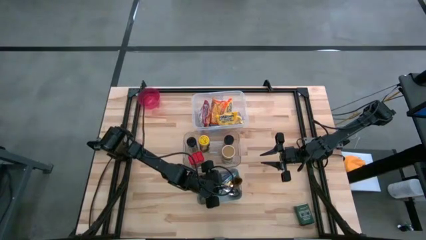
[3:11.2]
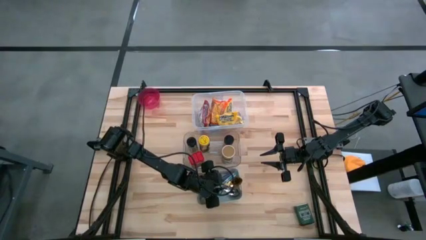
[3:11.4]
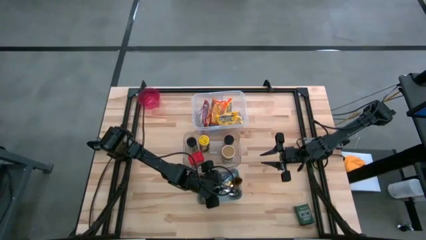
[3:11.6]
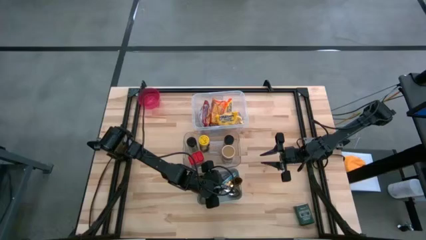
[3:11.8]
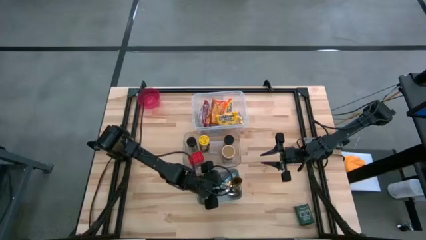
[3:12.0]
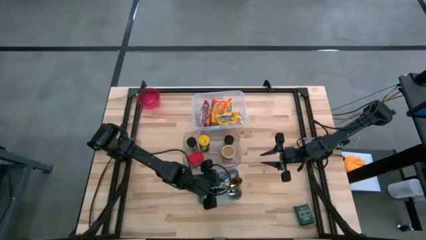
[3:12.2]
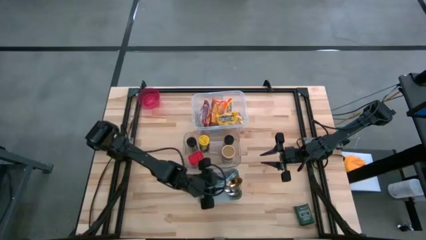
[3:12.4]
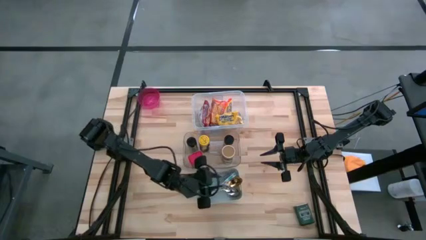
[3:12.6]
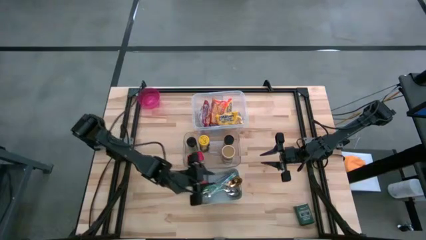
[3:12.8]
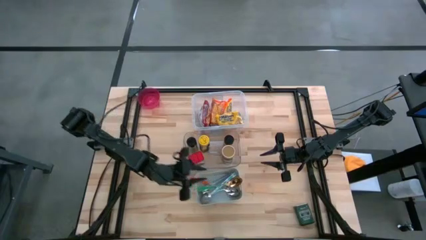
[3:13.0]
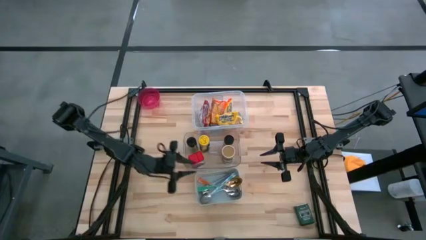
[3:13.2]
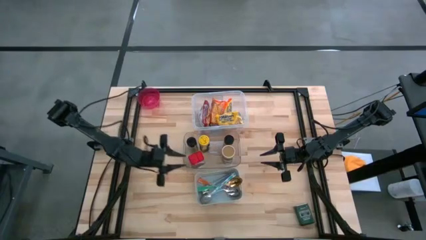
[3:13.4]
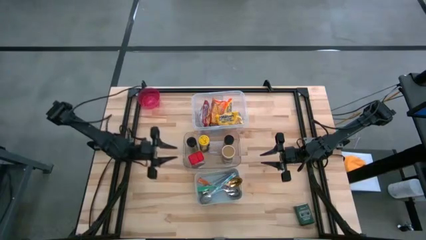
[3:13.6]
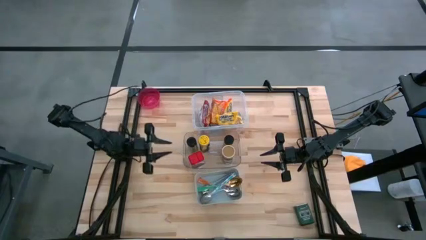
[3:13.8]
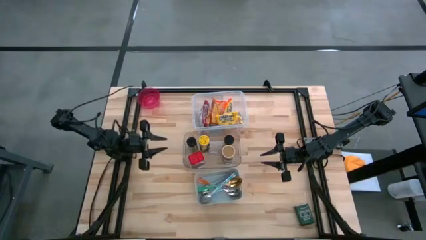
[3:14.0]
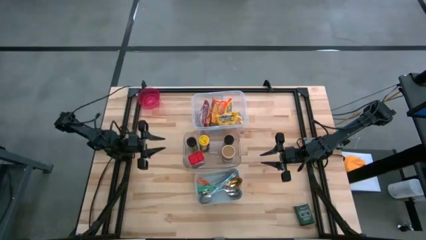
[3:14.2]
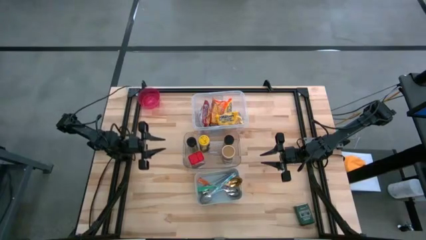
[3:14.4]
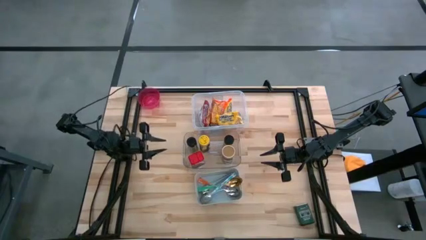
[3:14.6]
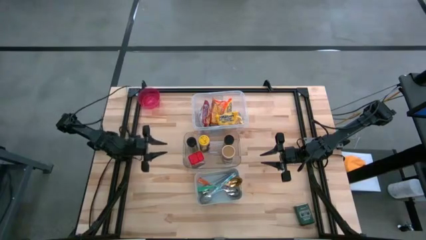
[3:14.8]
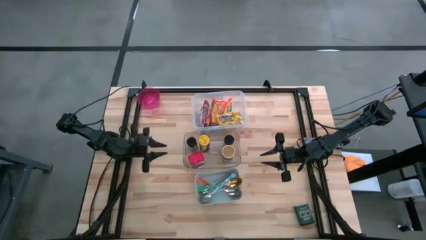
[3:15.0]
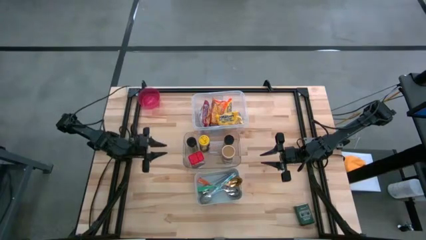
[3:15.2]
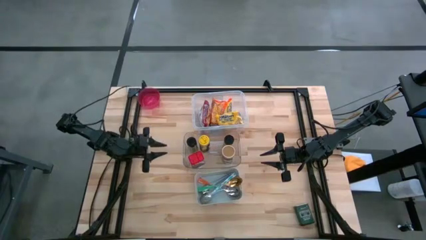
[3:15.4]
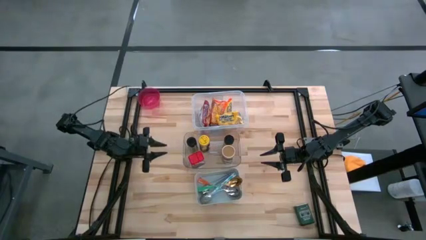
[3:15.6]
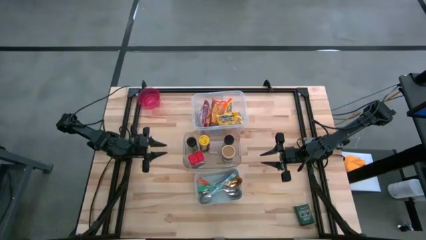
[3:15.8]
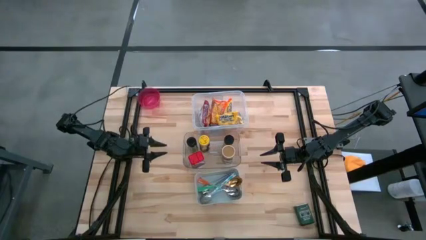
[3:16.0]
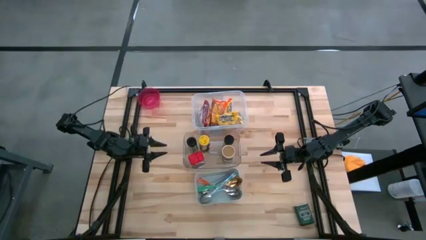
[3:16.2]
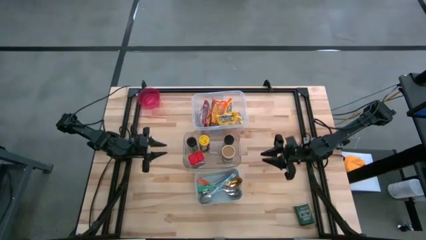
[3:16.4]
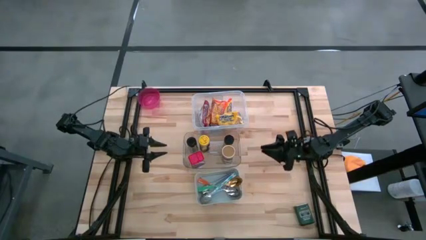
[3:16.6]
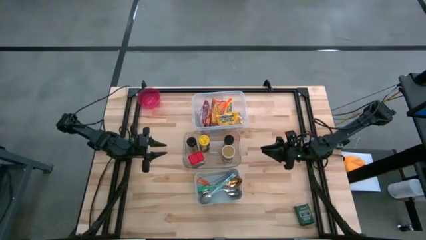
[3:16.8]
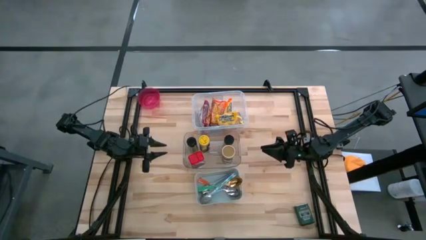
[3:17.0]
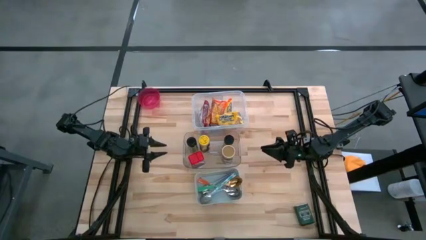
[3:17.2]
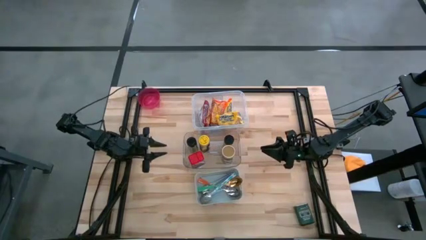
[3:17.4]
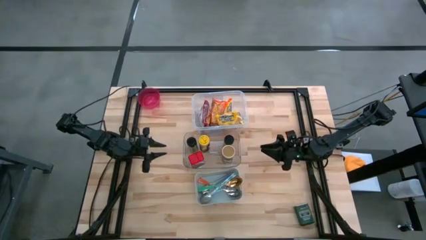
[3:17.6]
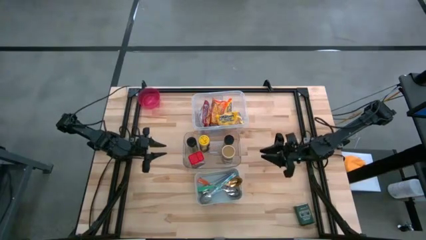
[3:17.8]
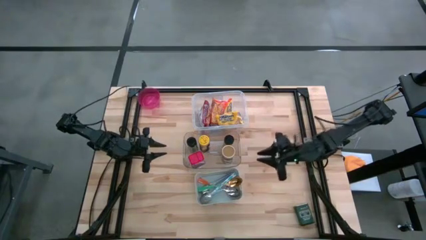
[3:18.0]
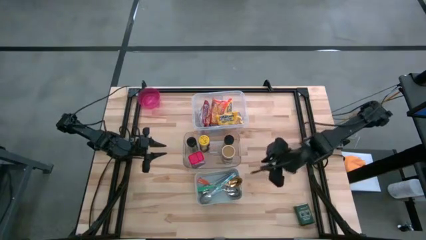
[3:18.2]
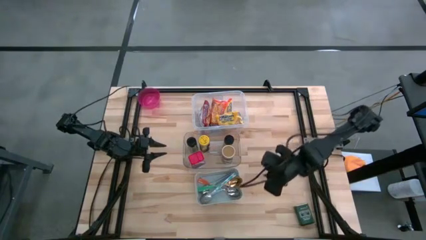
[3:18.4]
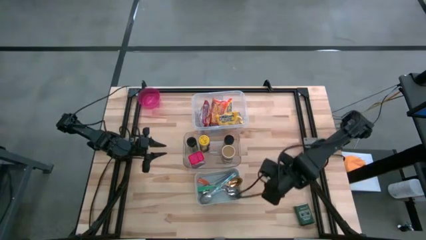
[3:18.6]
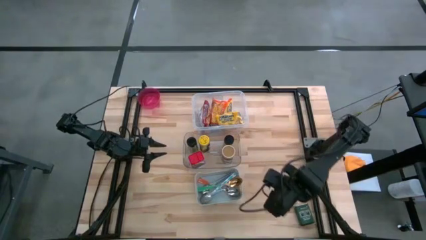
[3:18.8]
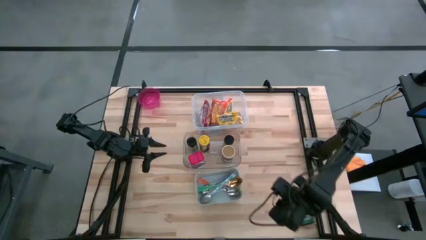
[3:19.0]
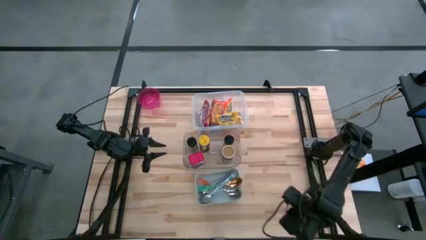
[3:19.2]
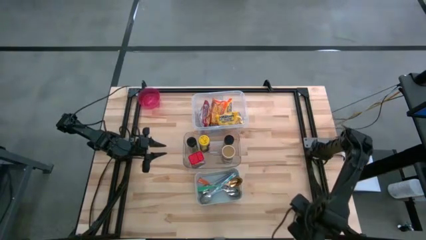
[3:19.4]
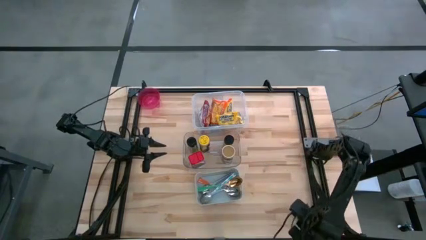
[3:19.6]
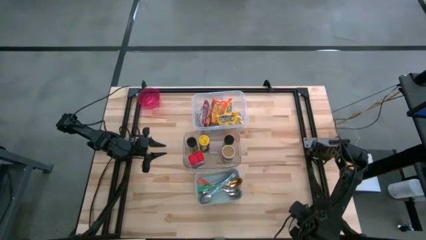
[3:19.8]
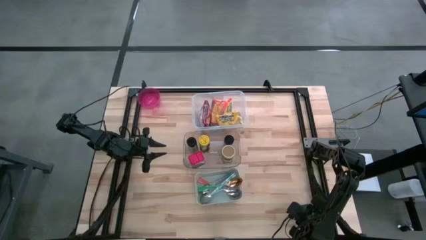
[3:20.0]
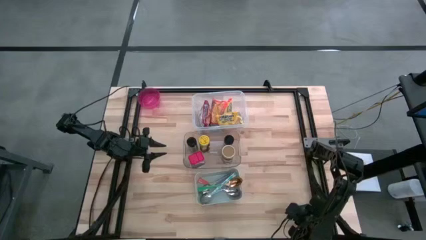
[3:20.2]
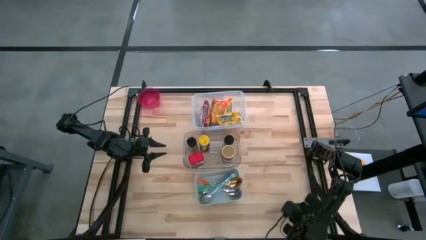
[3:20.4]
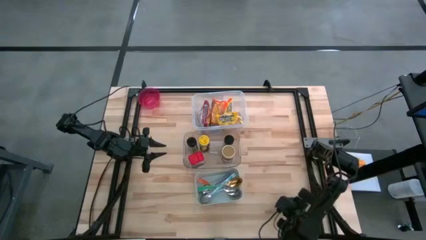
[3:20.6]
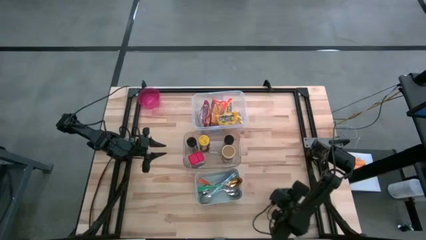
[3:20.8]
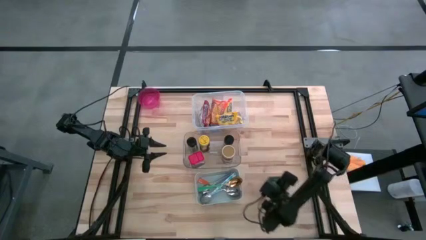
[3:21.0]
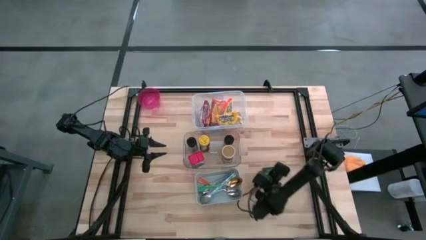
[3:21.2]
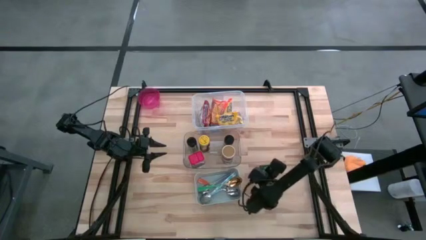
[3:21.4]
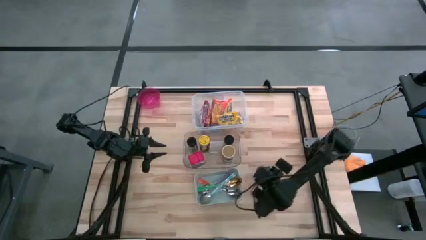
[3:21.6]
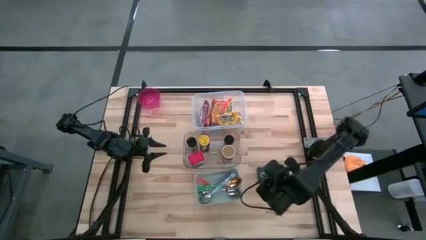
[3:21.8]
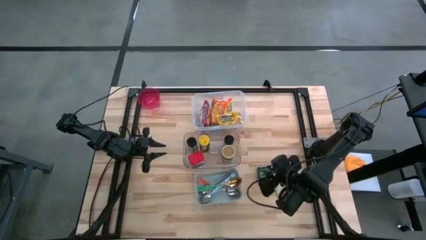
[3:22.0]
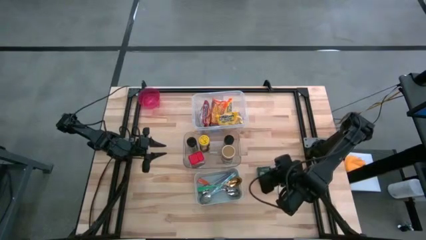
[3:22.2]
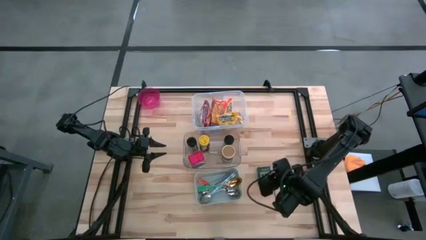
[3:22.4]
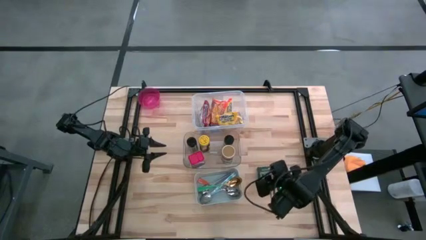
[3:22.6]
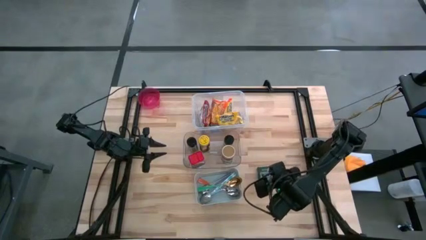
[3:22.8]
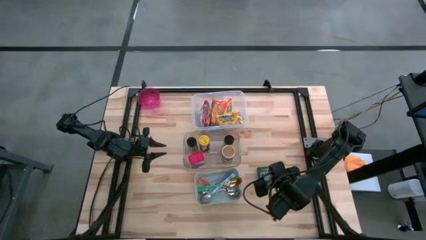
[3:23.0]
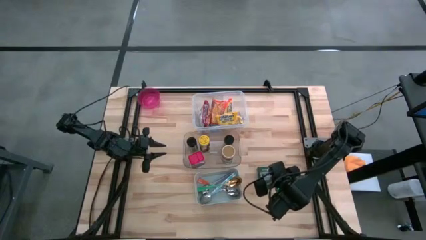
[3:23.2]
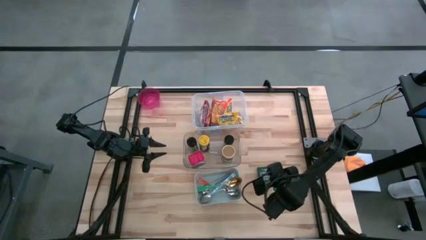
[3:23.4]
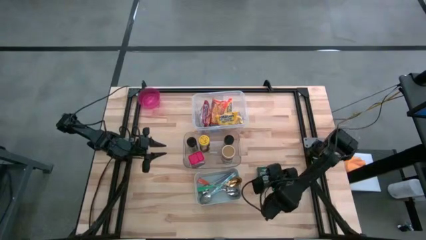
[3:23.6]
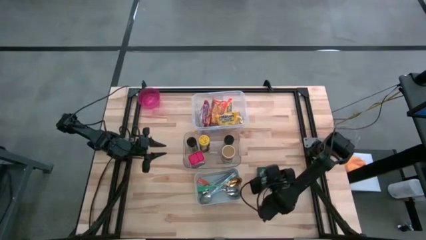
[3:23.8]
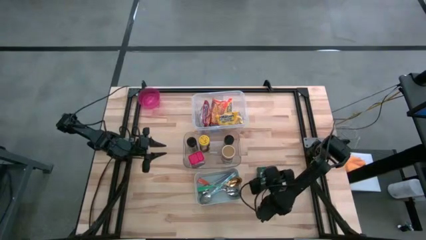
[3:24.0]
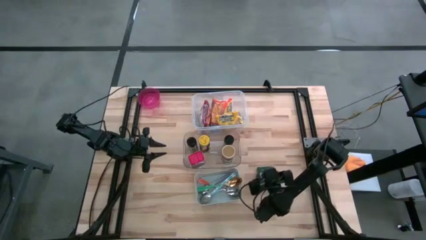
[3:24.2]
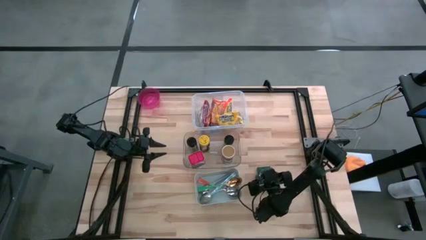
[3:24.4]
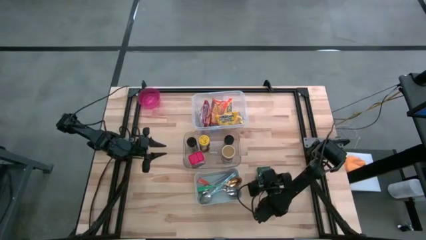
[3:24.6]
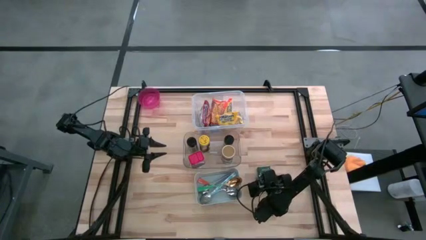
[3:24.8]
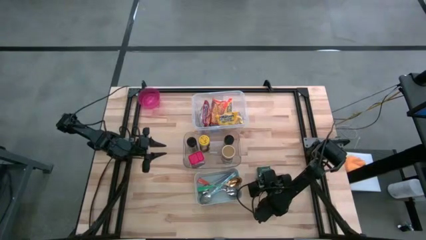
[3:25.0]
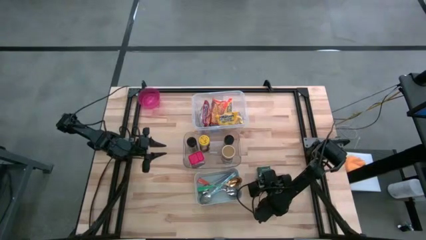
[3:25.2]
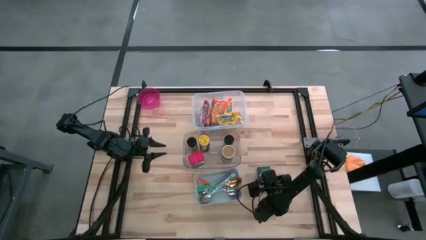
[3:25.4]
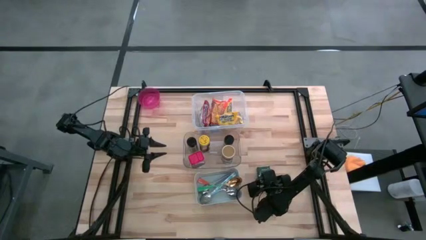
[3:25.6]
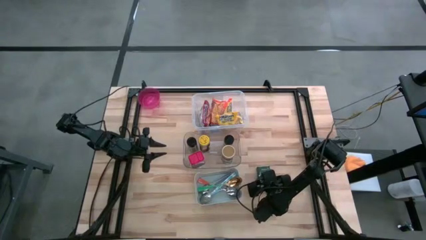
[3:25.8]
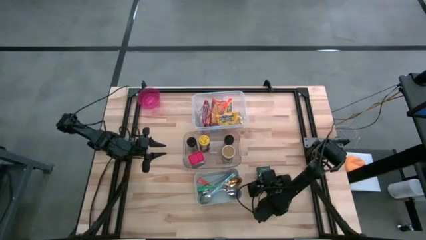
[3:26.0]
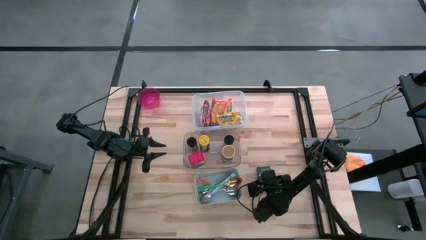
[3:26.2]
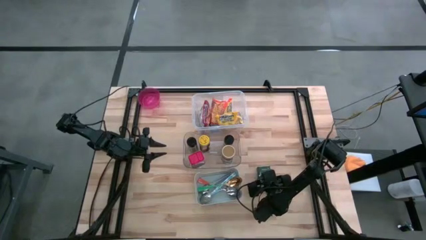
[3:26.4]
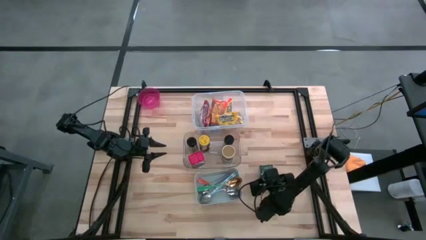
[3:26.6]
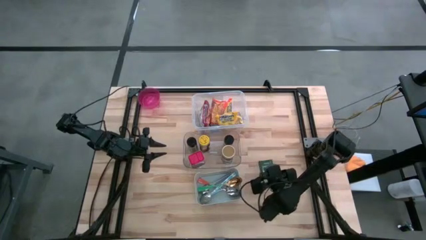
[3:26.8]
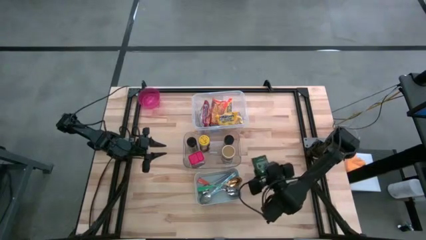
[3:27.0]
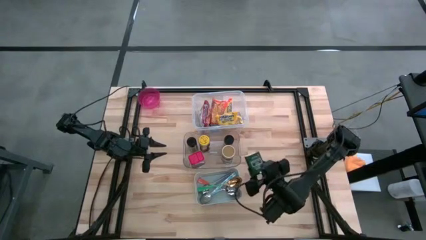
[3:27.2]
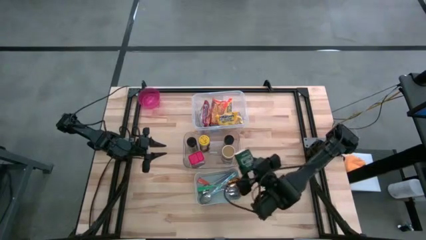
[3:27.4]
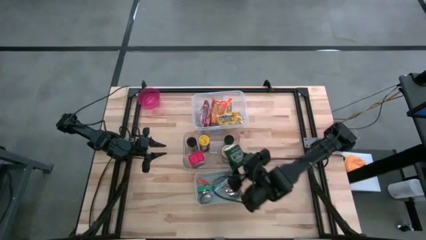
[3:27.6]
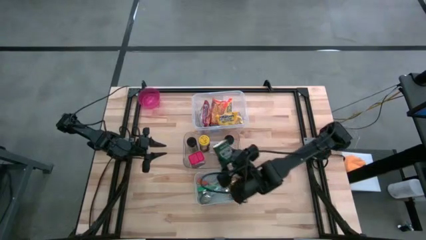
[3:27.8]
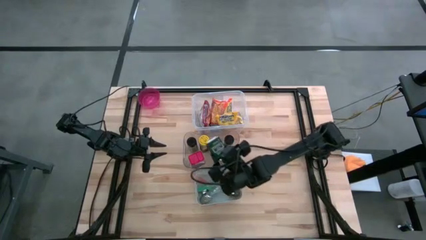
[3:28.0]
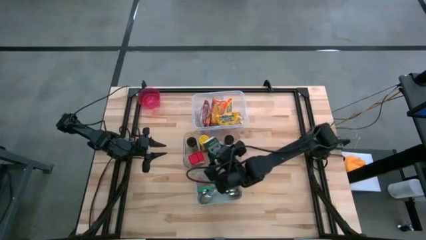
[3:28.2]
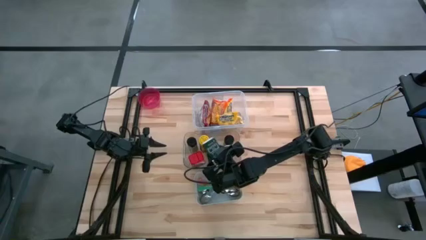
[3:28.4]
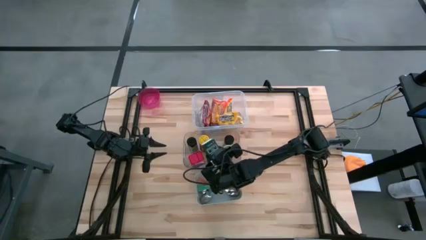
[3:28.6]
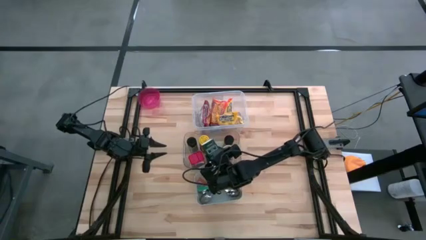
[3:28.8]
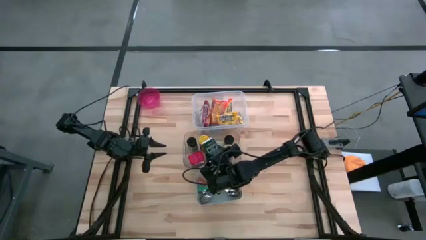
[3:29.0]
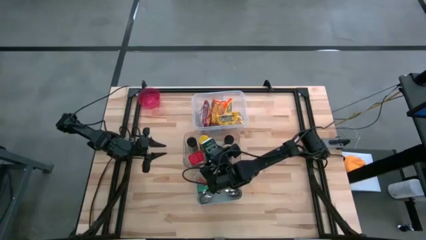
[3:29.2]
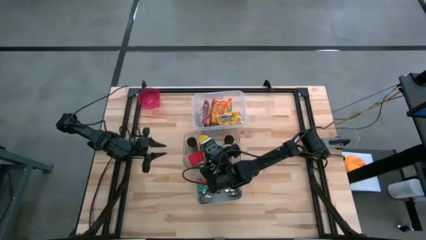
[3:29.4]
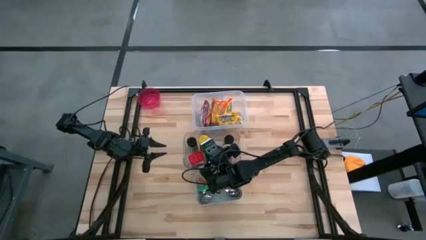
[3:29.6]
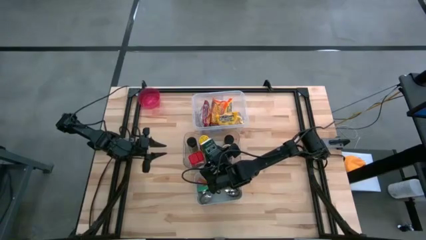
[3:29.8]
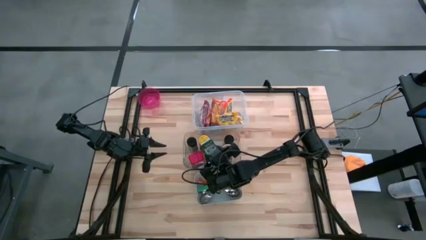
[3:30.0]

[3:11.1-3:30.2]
Put the green spice can into the transparent bin
